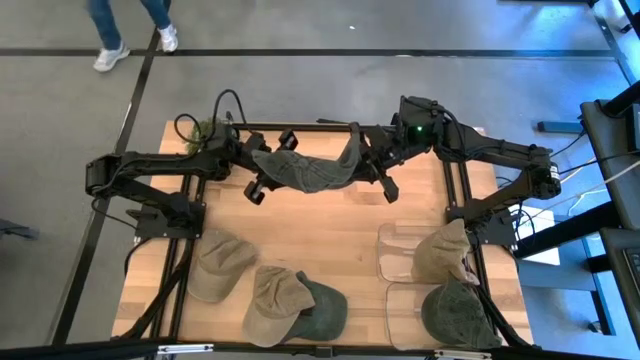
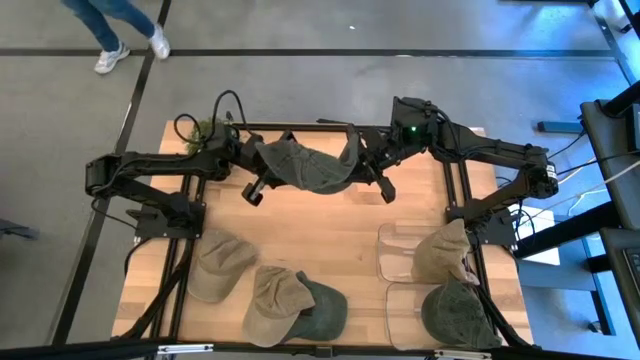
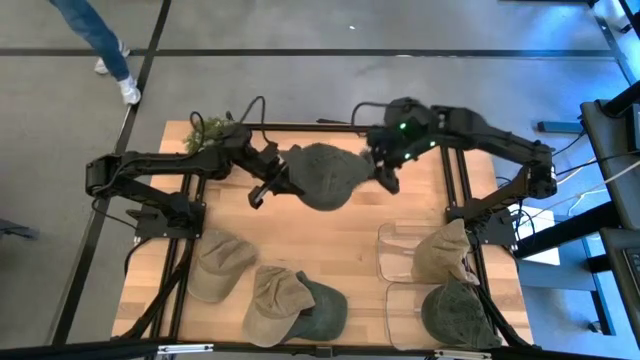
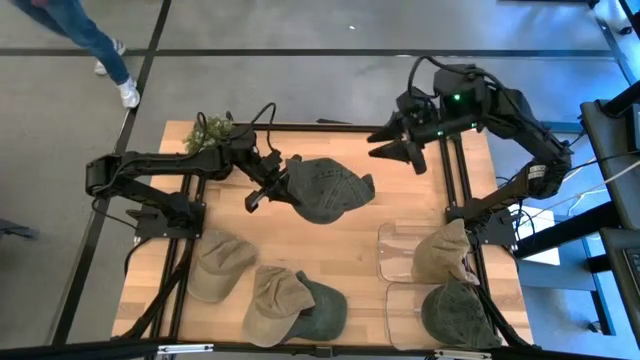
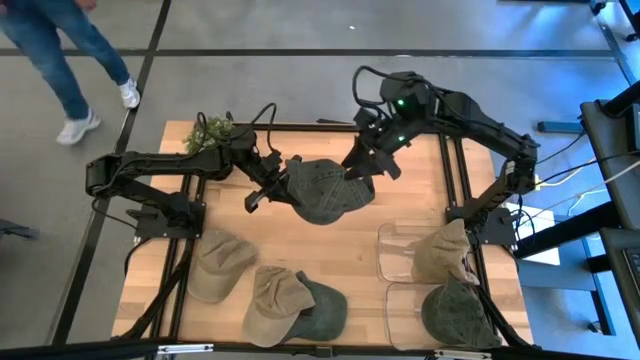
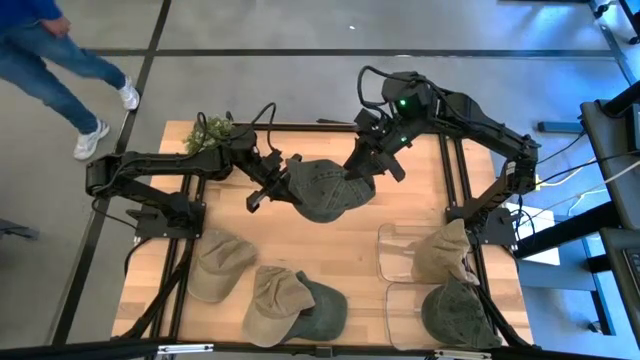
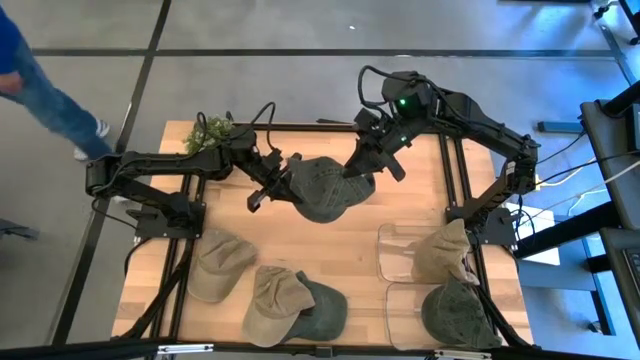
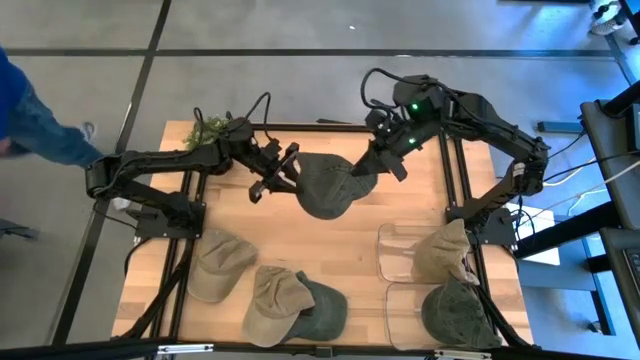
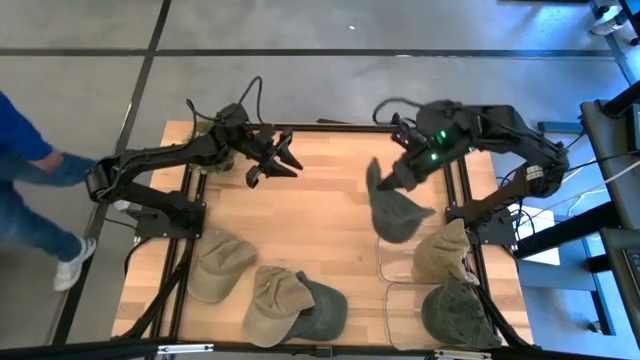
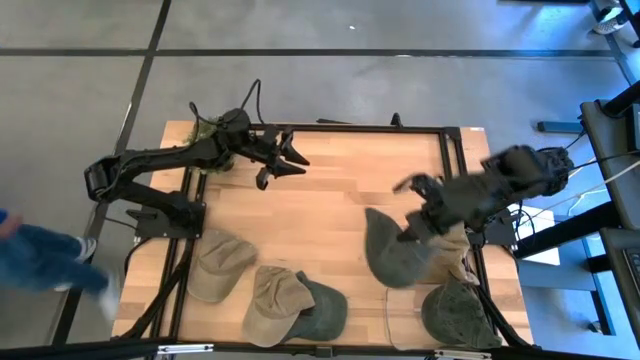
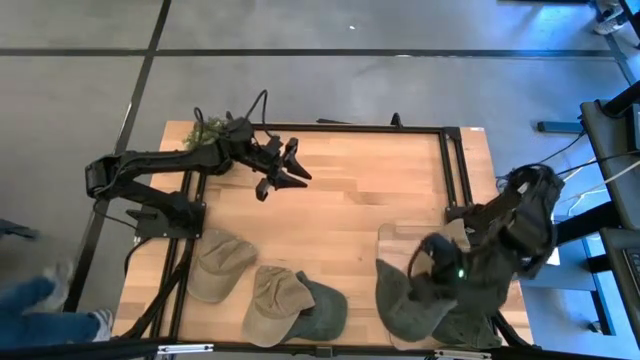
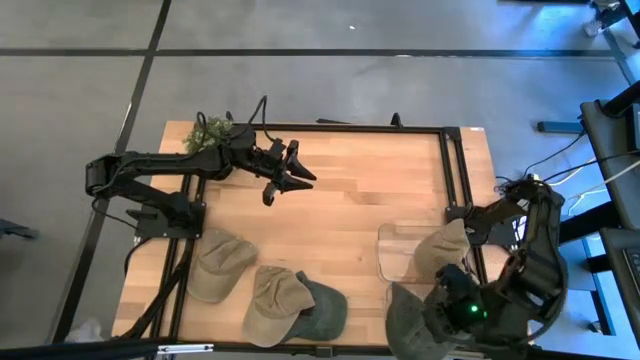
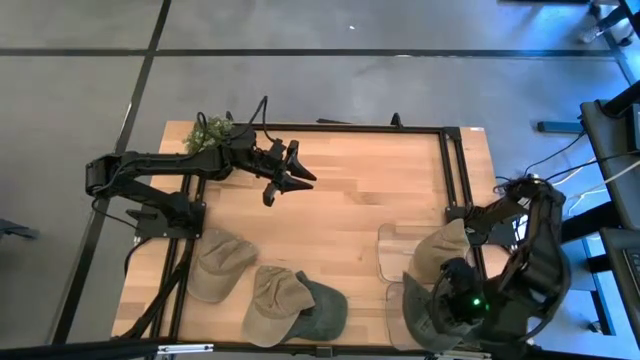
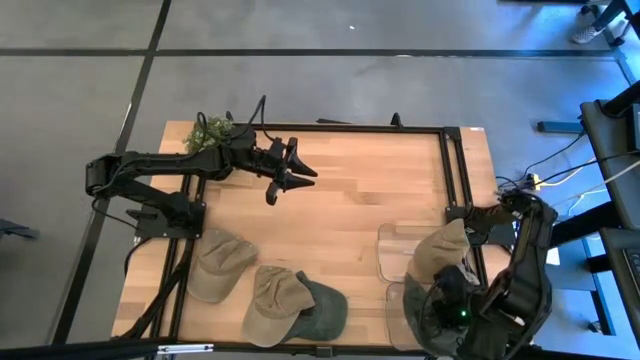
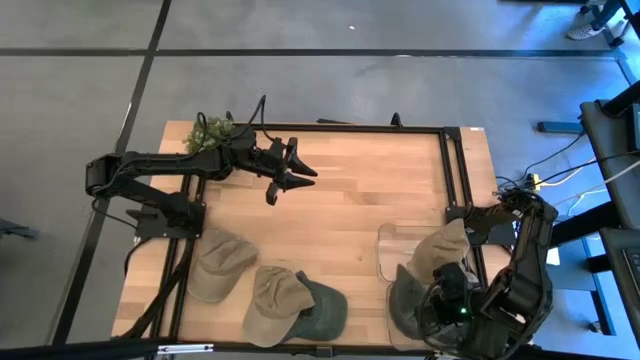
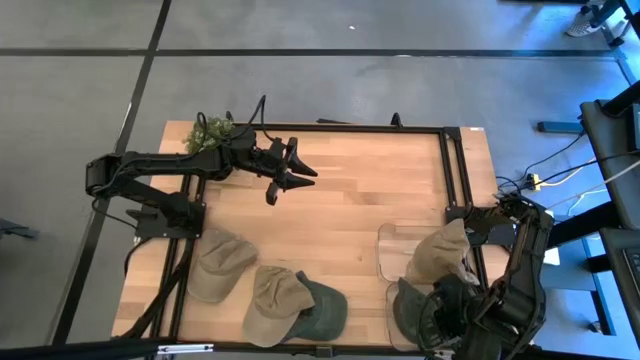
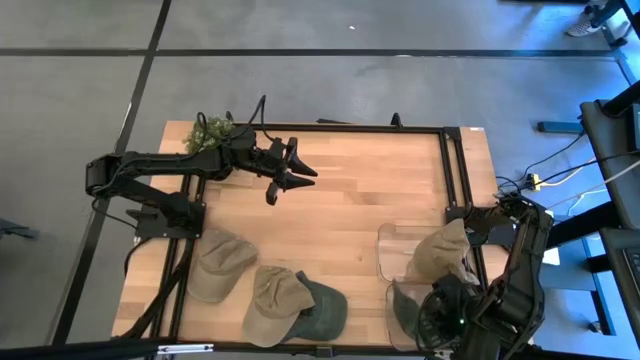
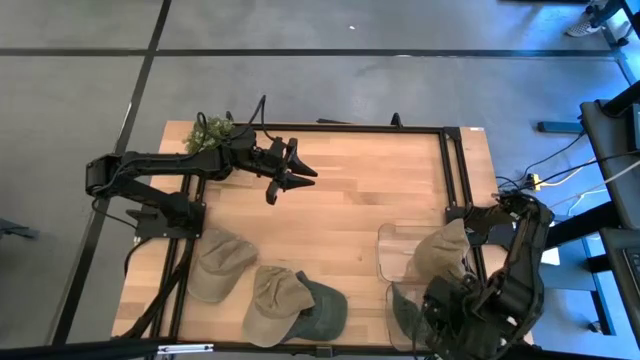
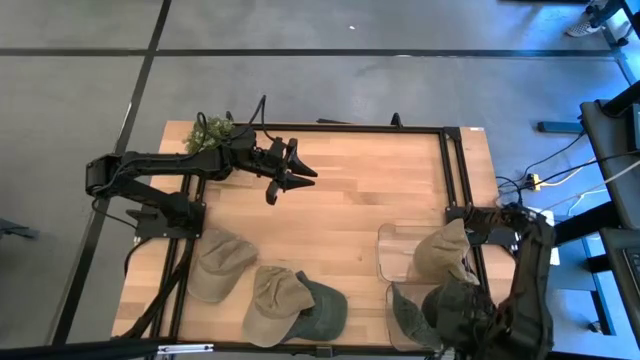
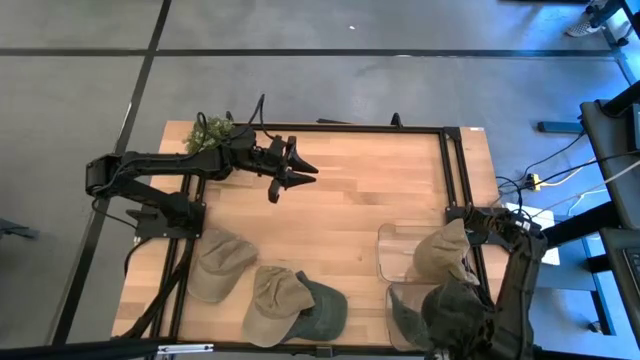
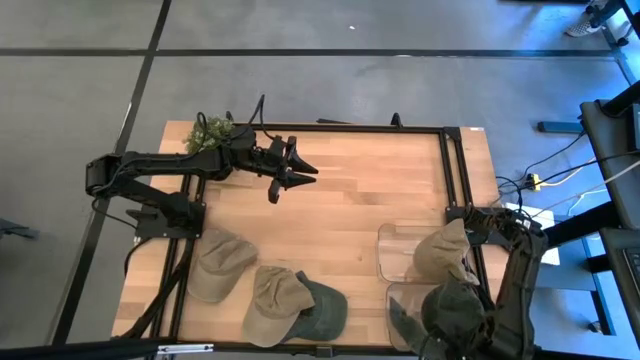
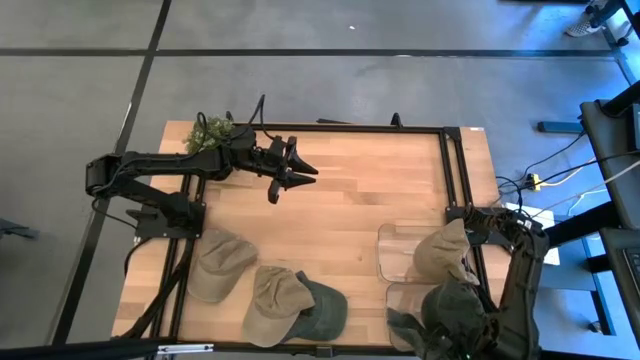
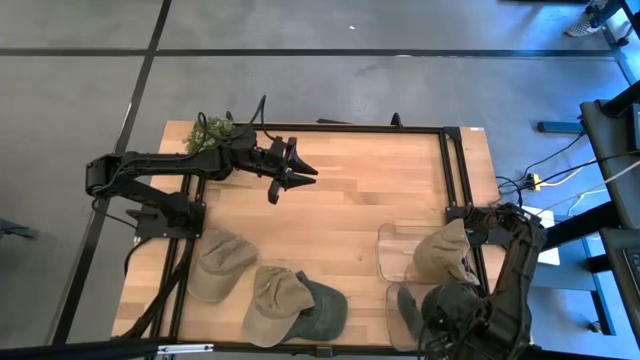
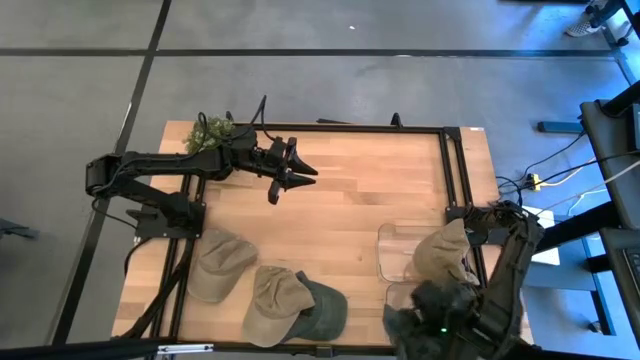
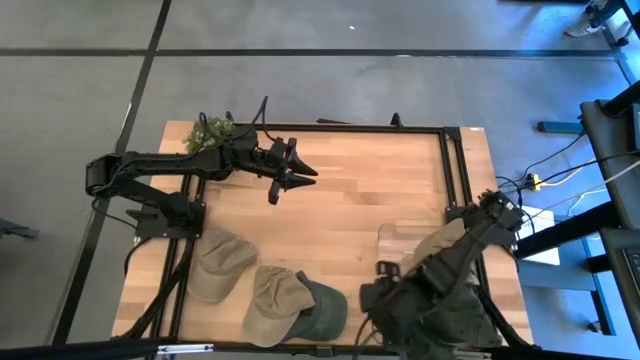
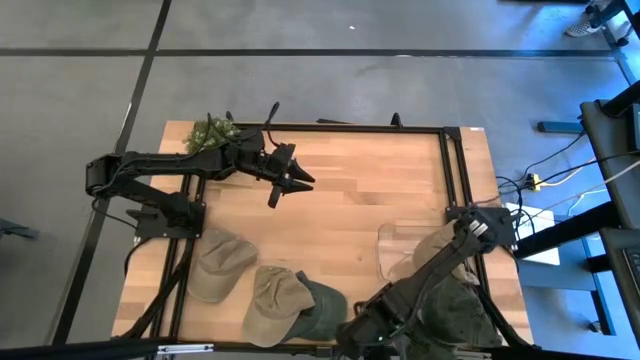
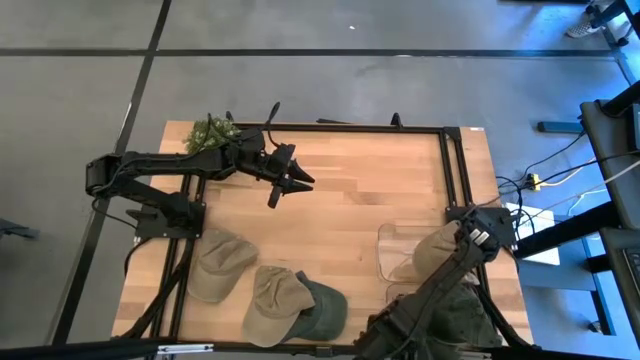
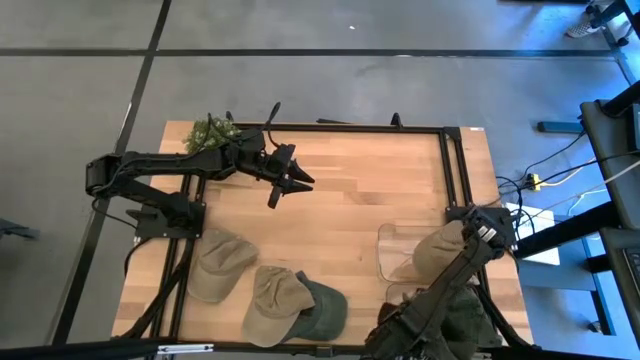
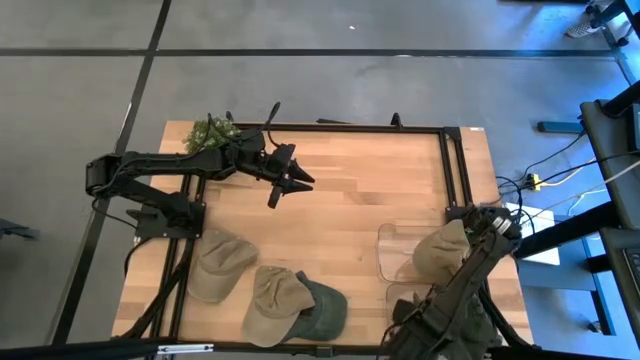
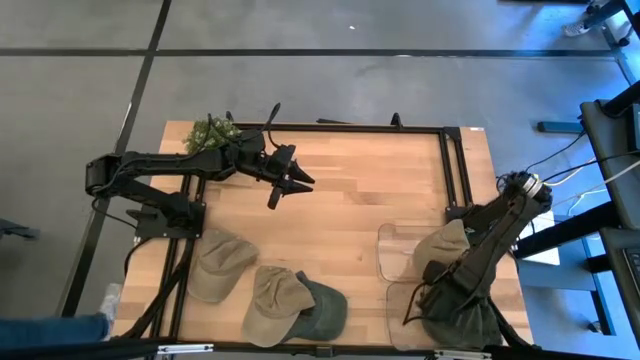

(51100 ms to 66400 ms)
Task: Pick & Place hat
Put the top black cap into the bottom transparent bin

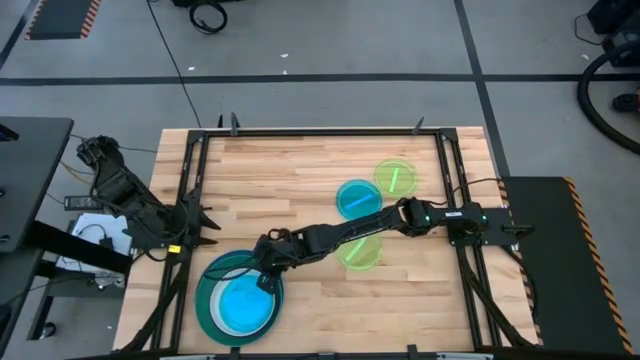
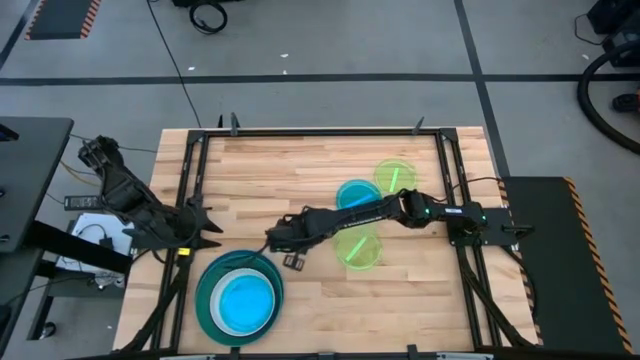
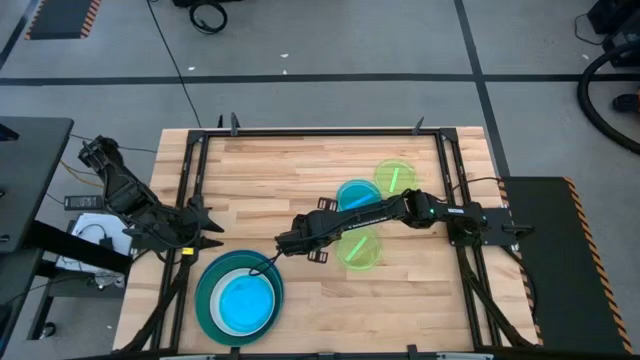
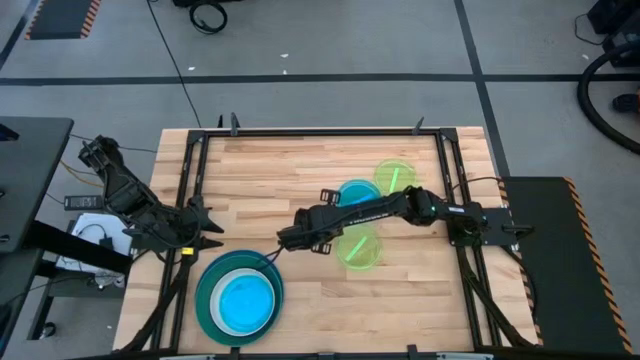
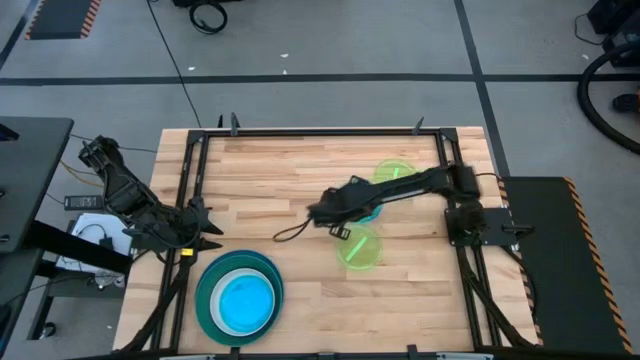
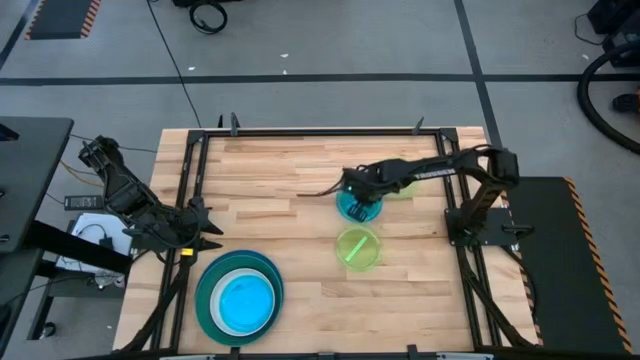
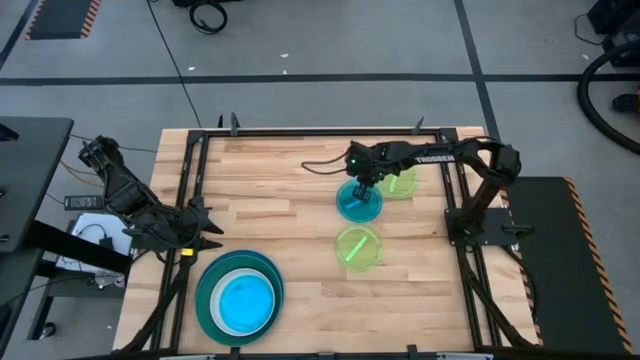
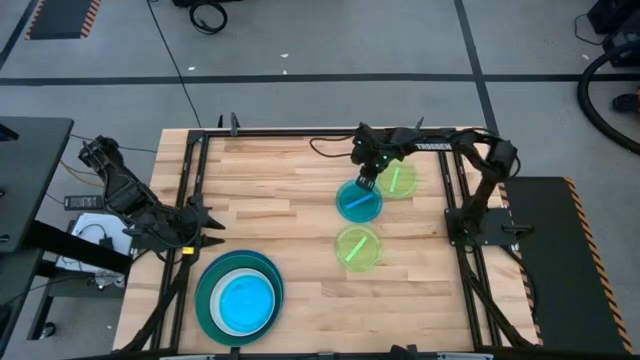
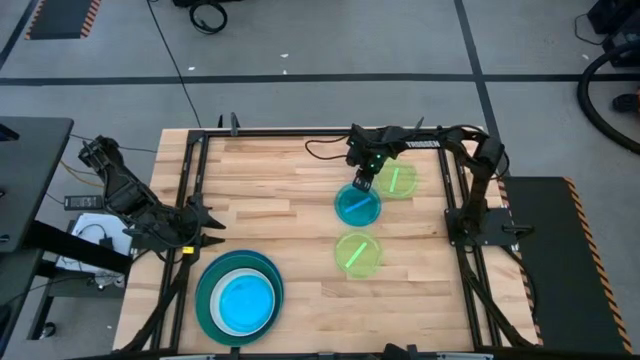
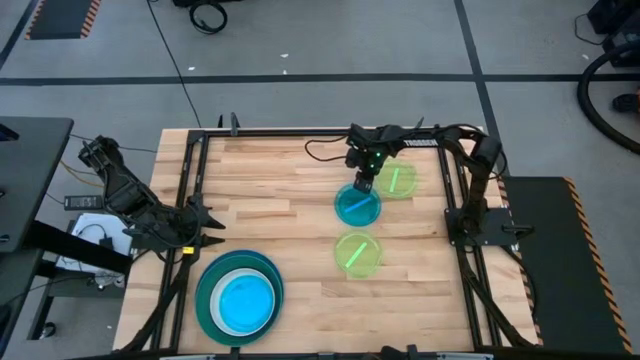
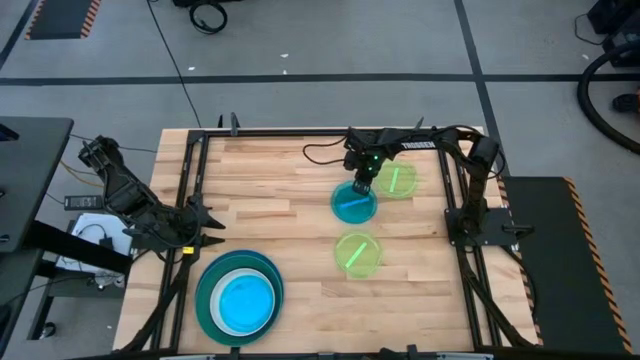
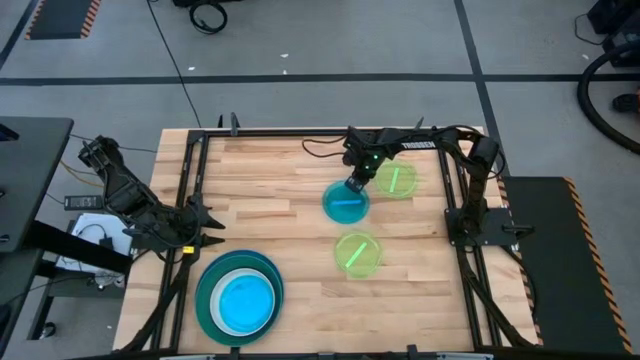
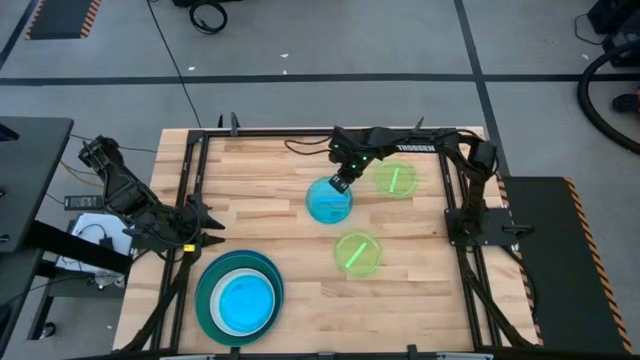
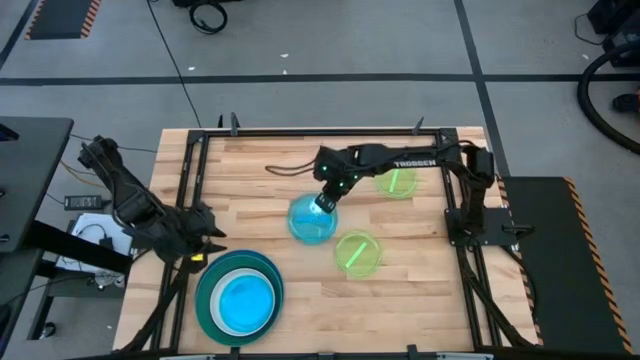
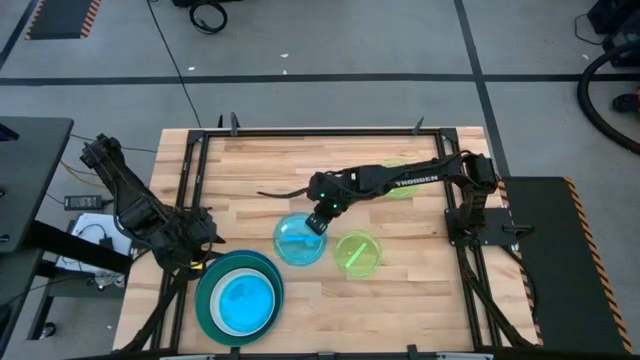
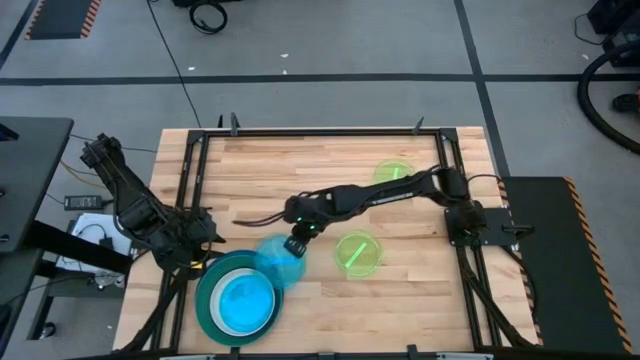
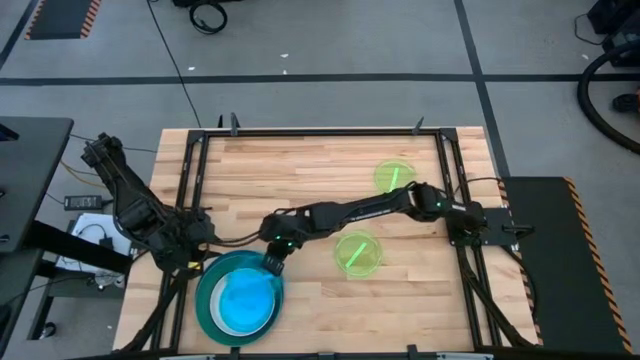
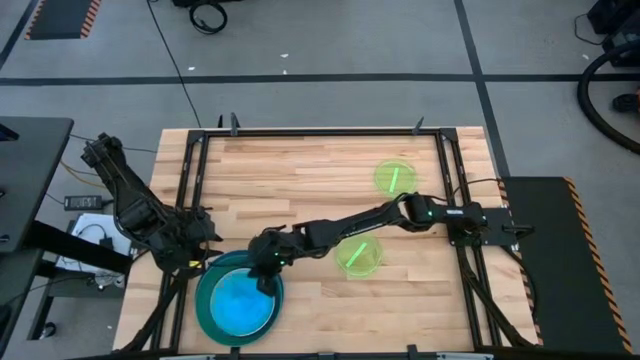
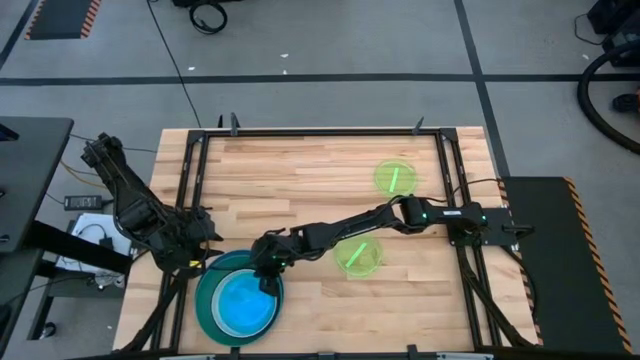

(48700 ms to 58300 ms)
Task: Stack plastic plates
Stack the light blue plate on top of the light blue plate
